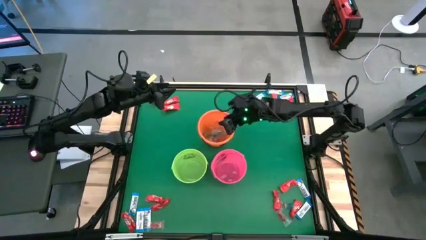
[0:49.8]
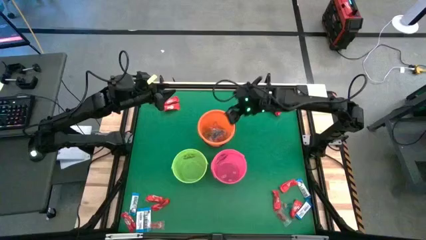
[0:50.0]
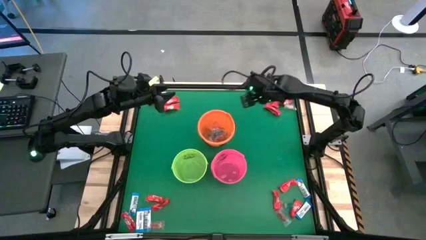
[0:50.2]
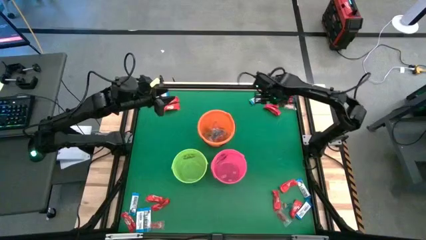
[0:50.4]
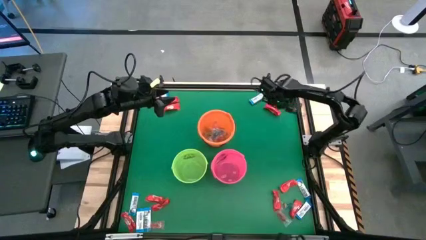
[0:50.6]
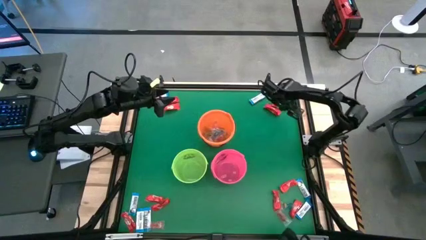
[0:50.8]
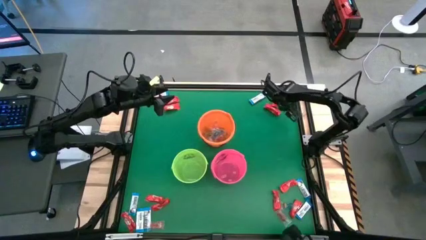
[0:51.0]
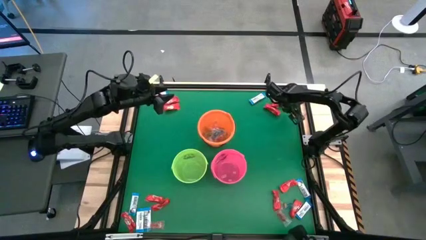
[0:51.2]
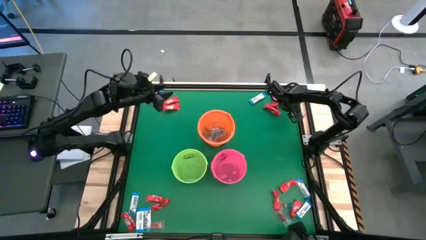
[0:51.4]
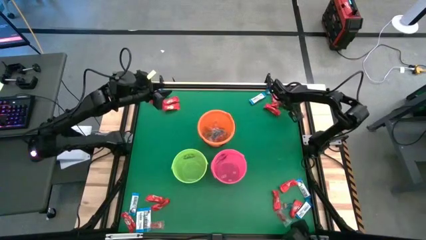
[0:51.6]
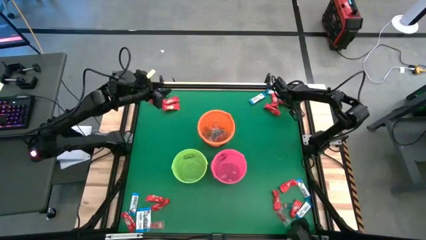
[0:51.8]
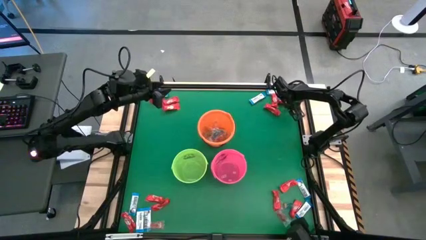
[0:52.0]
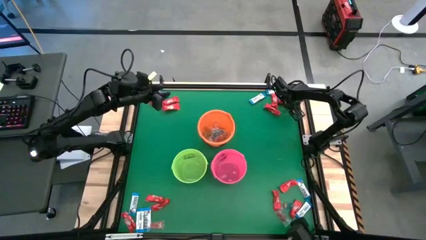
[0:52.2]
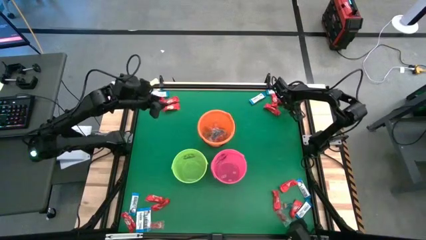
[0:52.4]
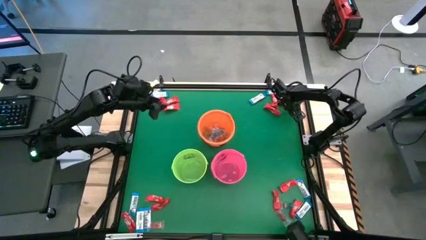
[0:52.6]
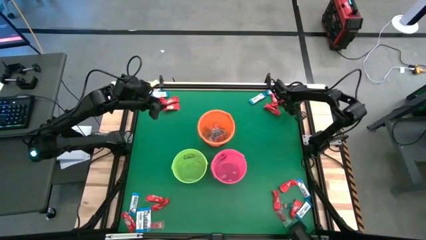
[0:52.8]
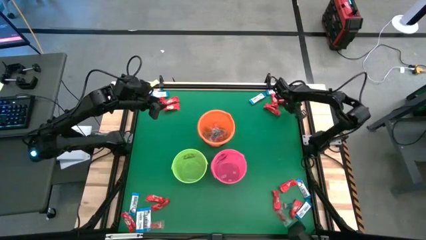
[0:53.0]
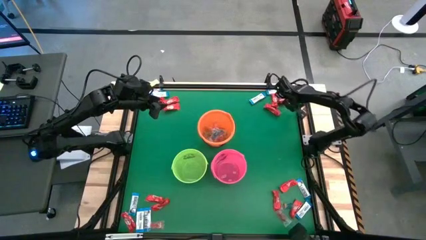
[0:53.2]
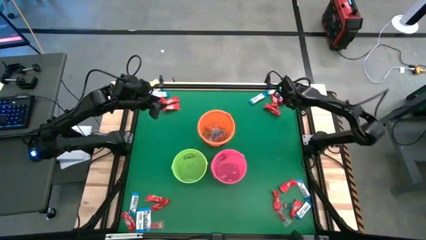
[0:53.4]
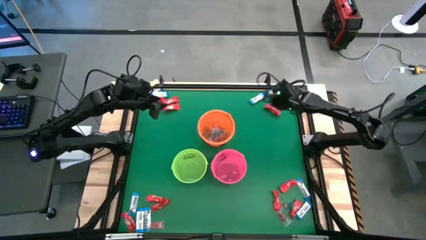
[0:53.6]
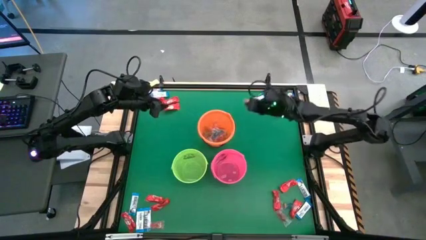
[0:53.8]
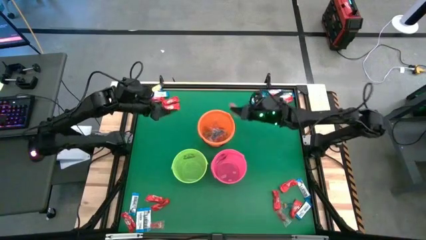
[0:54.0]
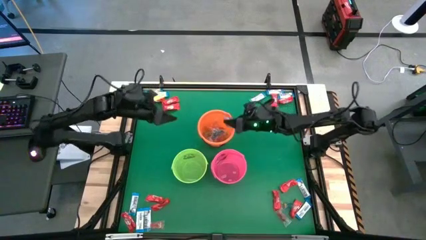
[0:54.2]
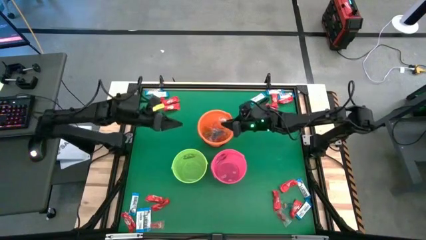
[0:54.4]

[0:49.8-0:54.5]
Task: Sort candy by brand, put in halloween buckets
Put the orange gummy into the orange bucket

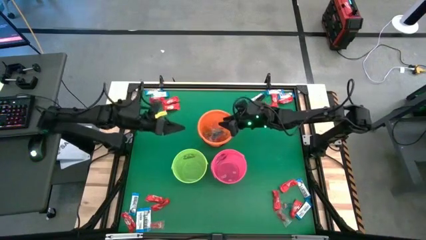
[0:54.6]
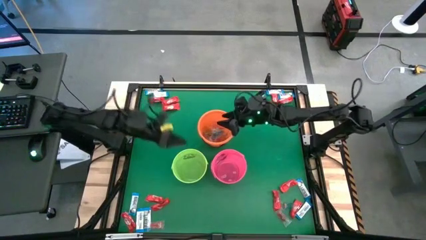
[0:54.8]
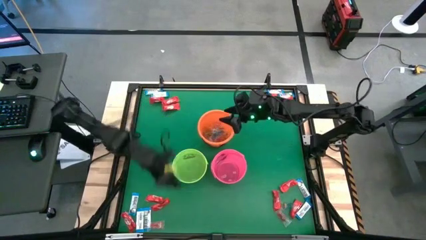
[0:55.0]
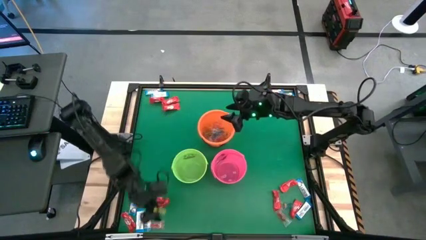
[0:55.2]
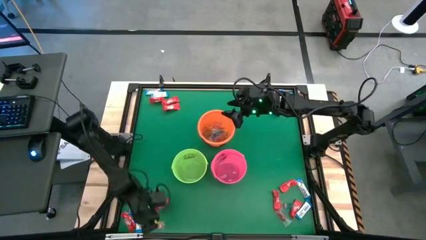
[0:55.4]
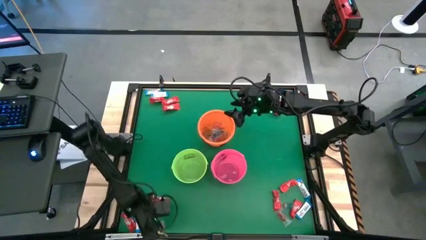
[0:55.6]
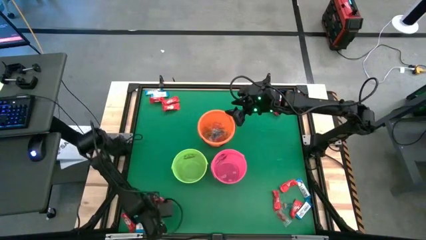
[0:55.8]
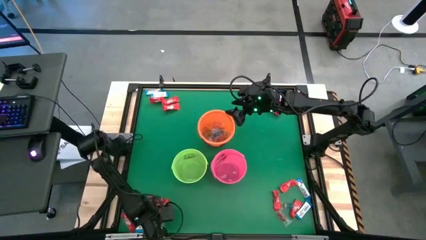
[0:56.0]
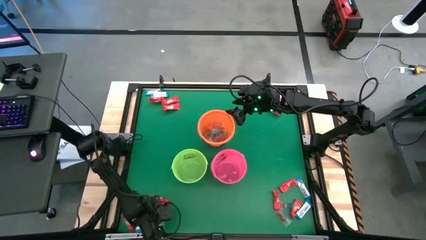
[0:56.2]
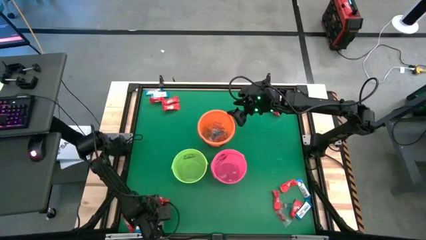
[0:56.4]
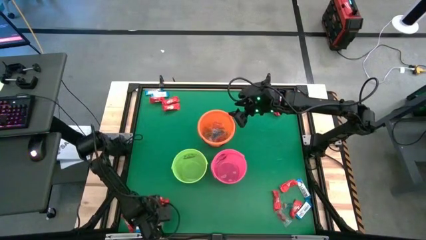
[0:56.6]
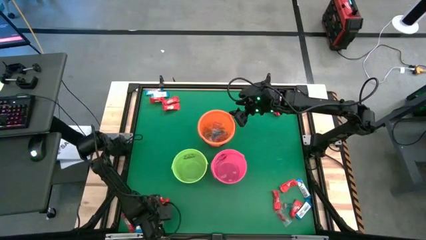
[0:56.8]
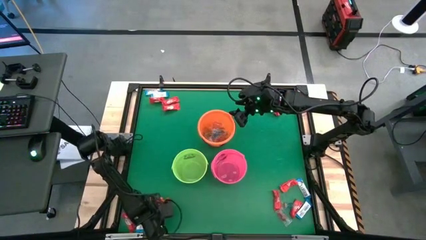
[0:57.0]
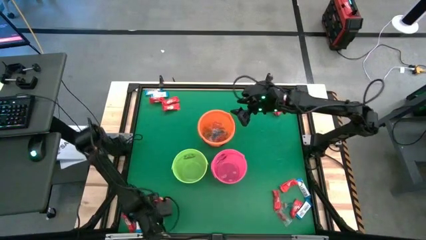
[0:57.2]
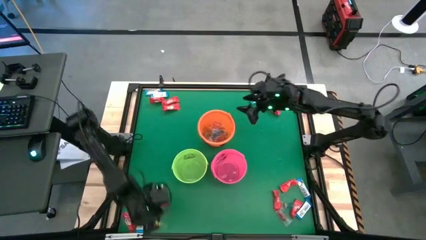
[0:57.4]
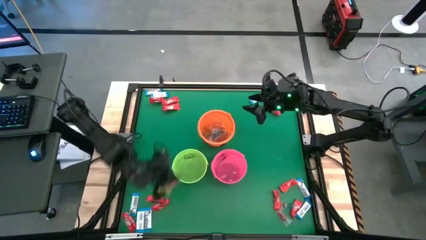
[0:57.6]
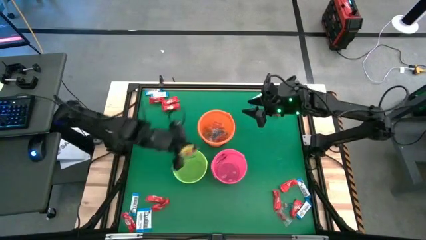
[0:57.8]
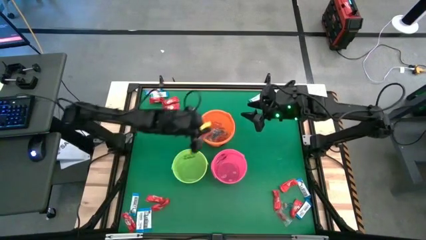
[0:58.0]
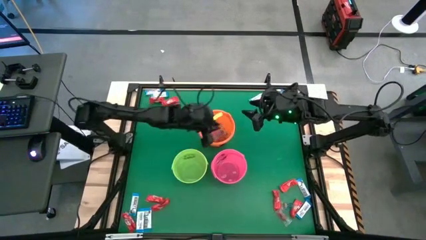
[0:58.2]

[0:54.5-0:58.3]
Put the red gummy into the orange bucket

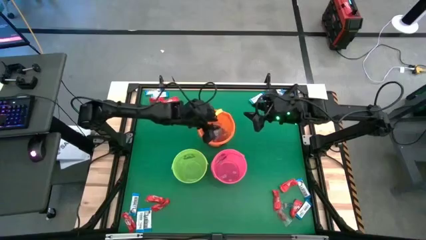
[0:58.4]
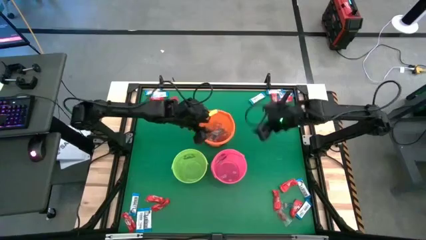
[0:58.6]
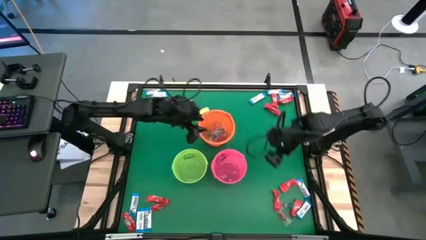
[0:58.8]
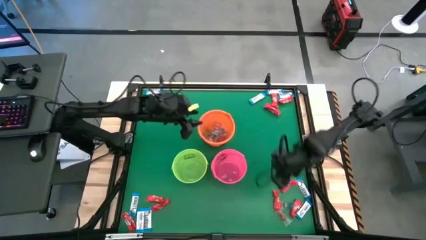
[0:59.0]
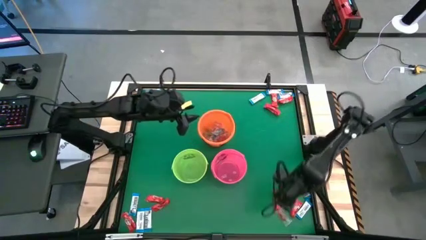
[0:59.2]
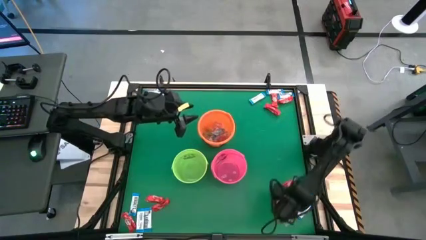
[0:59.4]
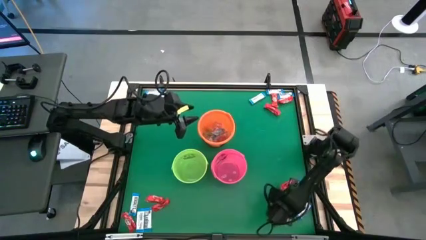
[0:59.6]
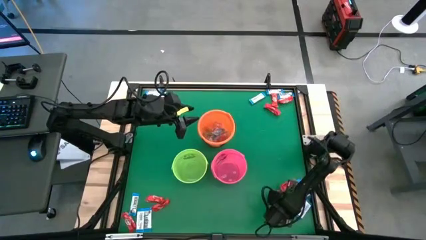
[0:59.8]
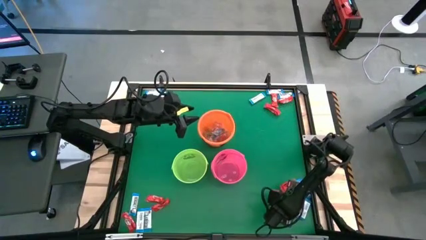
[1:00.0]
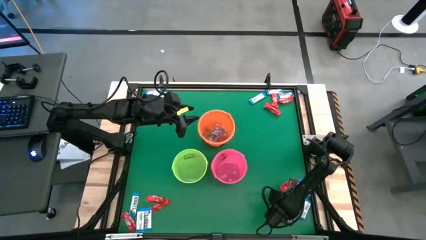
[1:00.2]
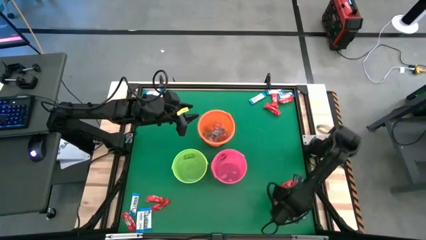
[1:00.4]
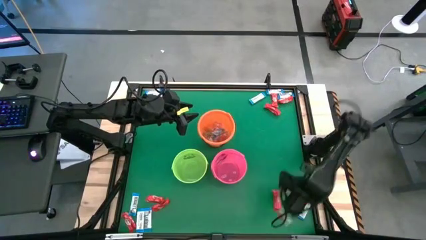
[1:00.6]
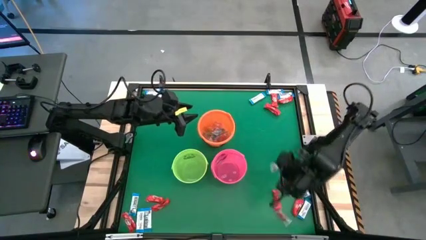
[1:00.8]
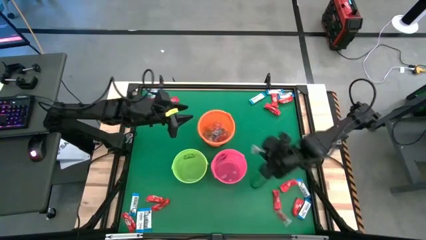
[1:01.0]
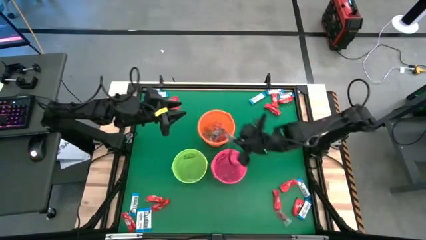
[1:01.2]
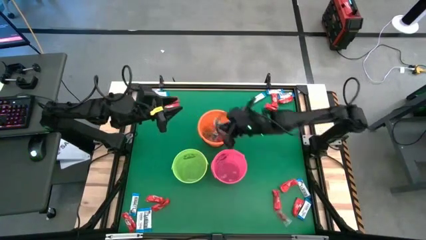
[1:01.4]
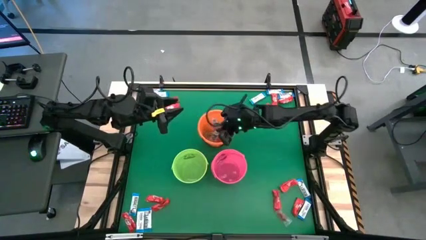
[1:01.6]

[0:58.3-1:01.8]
Put the blue gummy into the orange bucket

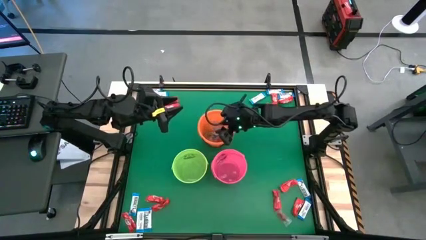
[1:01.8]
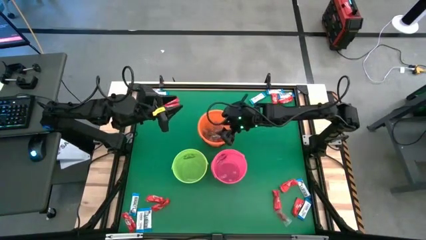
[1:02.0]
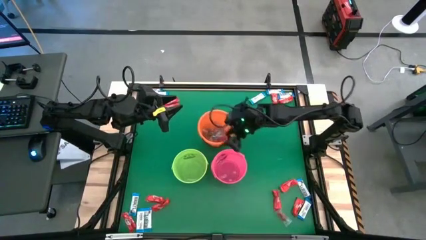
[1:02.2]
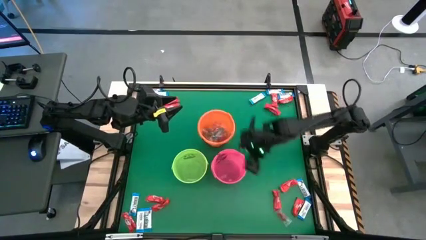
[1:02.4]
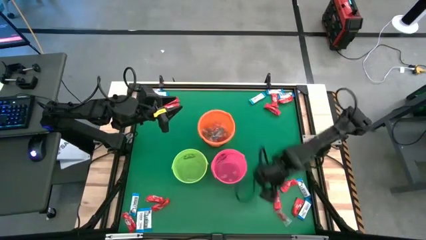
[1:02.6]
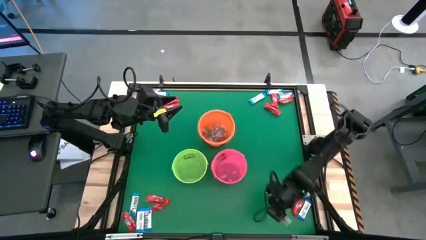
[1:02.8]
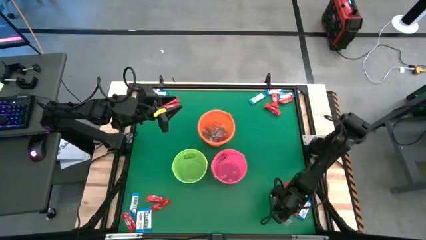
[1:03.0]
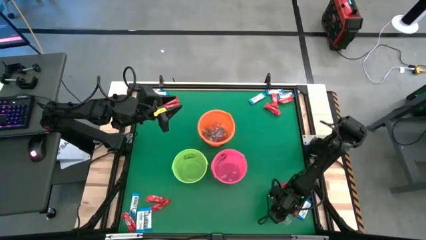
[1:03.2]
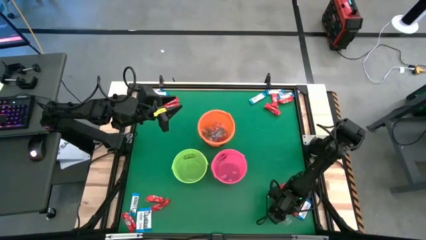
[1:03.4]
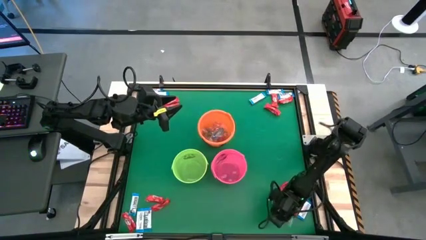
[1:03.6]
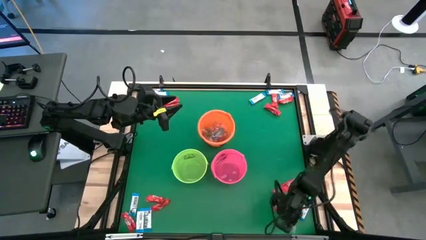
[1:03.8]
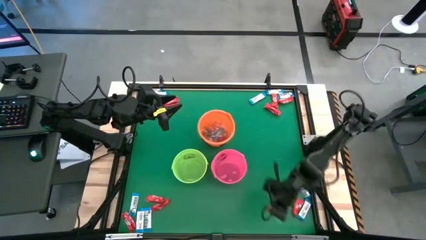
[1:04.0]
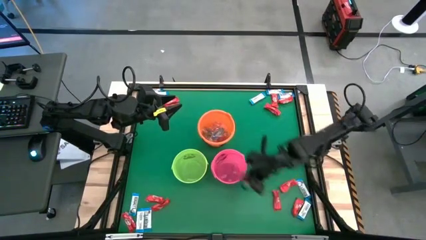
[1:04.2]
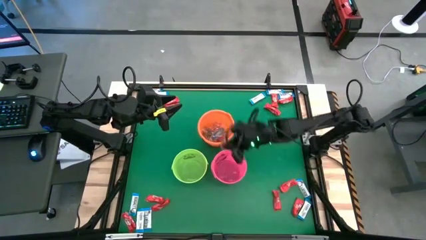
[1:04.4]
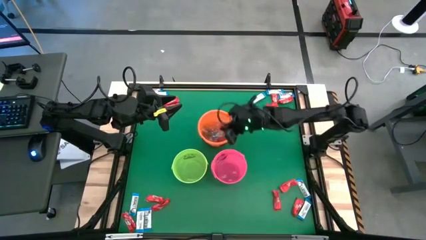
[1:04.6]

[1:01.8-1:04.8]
Put the red gummy into the orange bucket

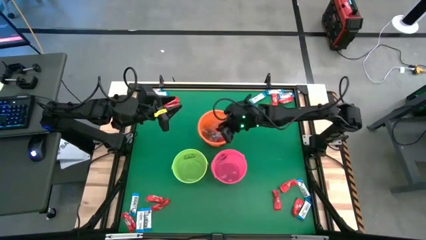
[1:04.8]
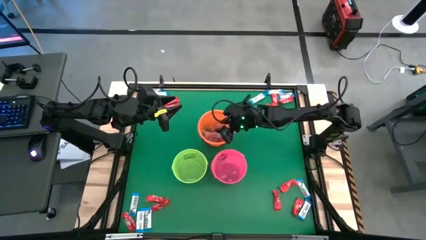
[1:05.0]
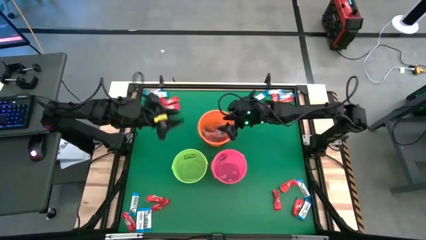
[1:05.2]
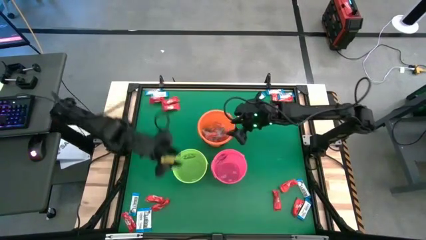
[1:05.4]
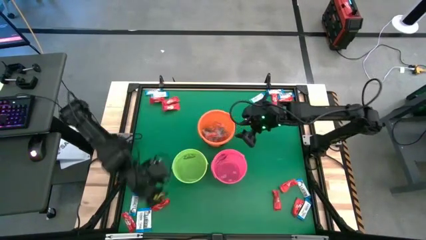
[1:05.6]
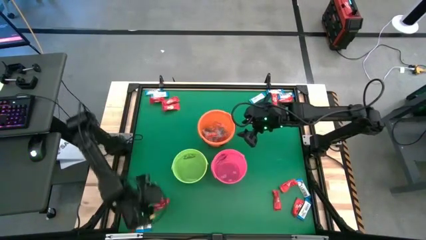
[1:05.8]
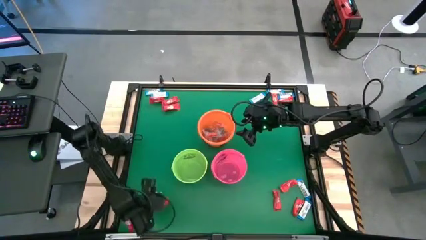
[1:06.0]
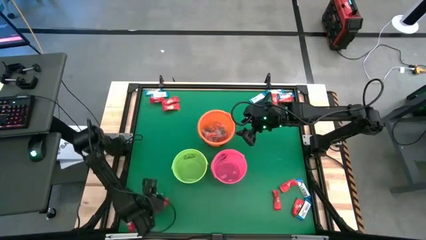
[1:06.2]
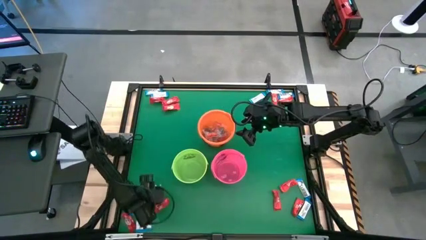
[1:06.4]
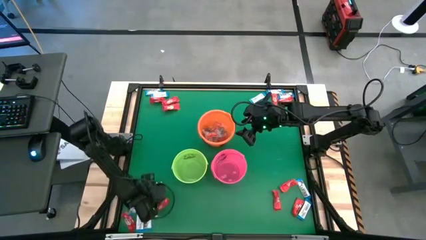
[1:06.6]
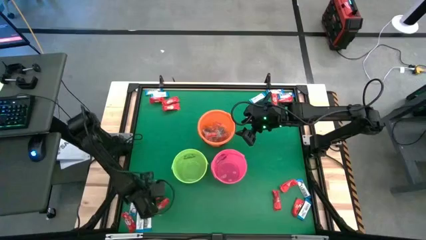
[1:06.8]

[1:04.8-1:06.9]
Put the red chocolate bar into the pink bucket
